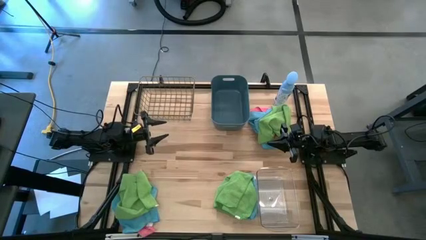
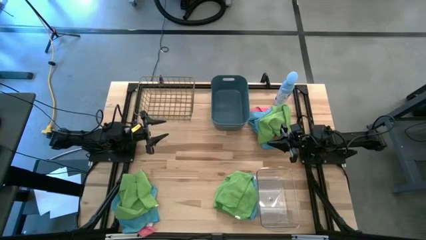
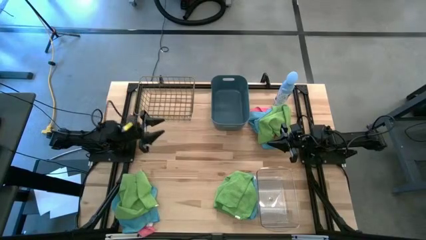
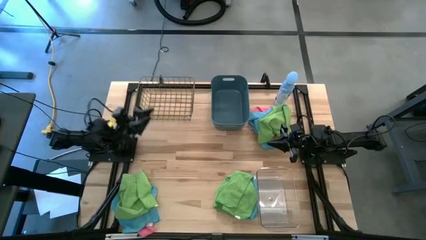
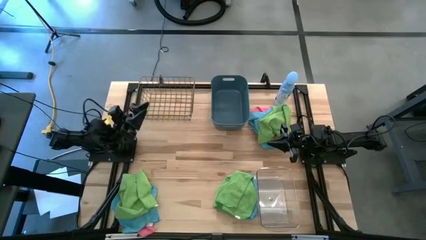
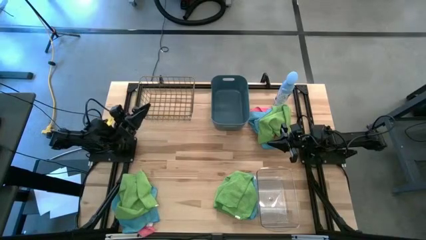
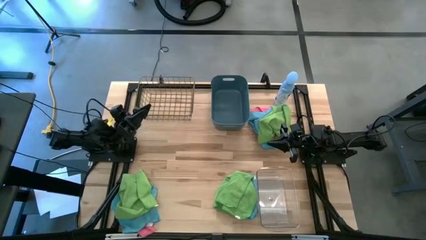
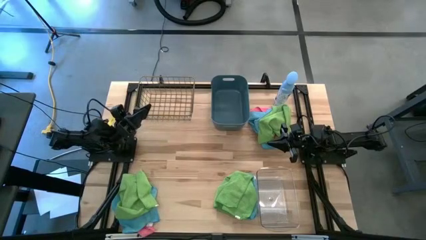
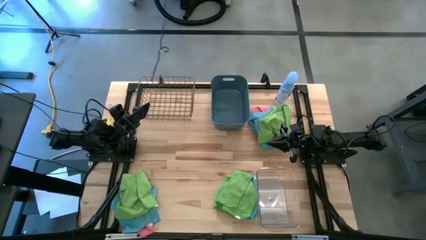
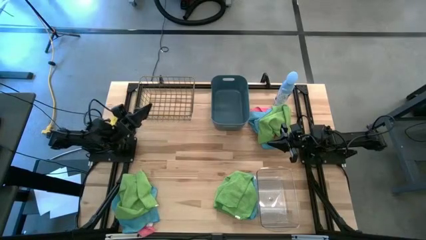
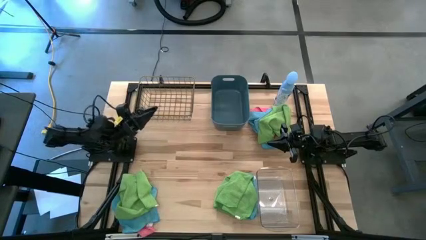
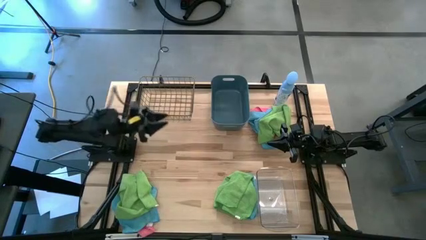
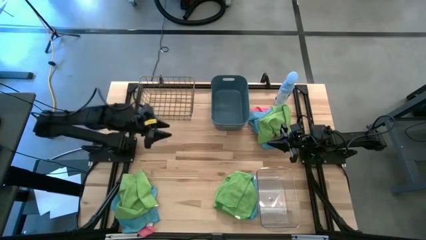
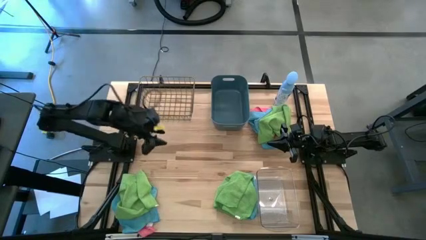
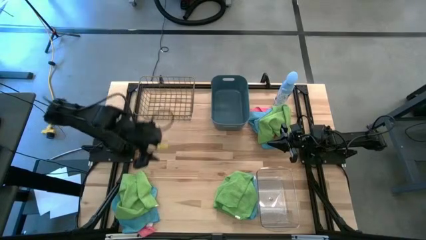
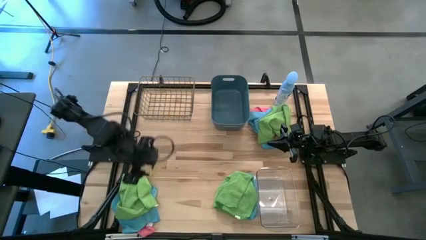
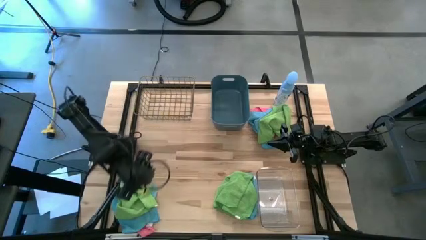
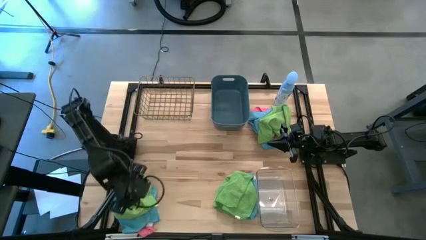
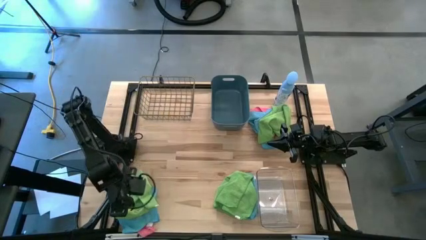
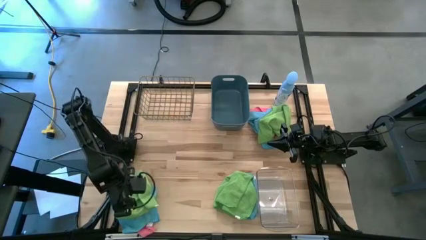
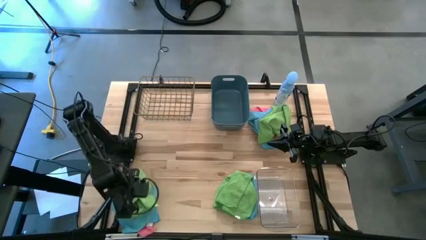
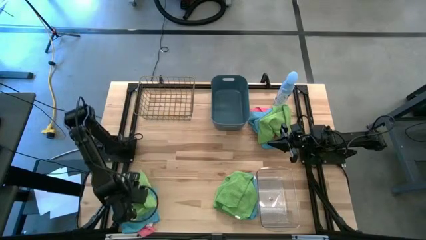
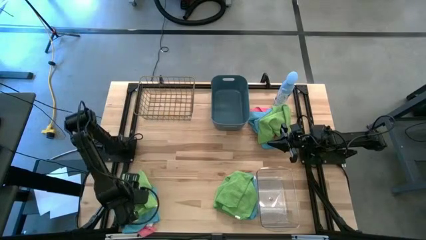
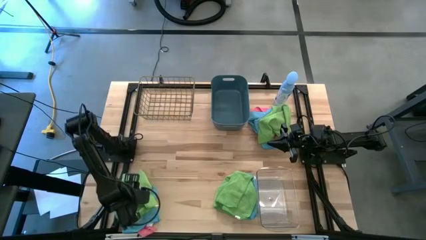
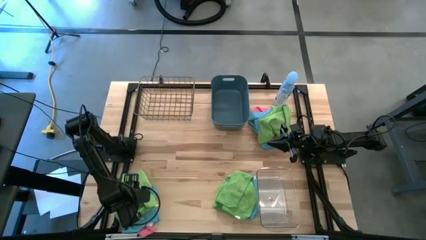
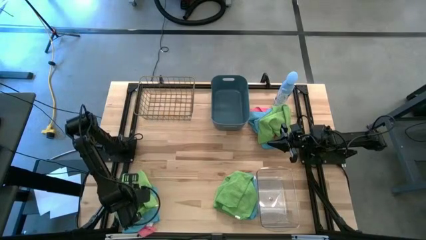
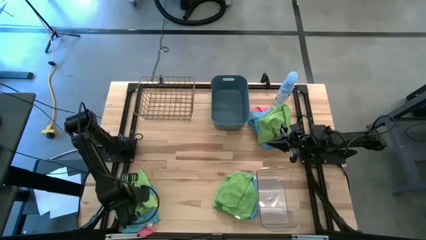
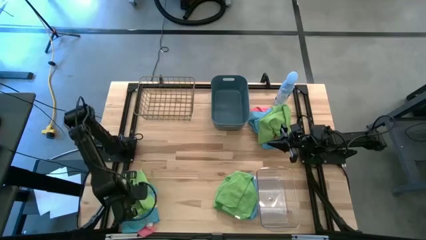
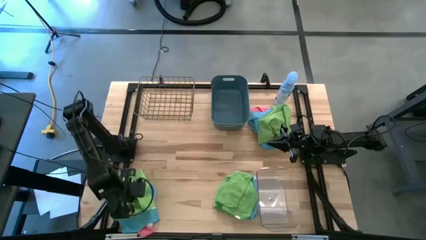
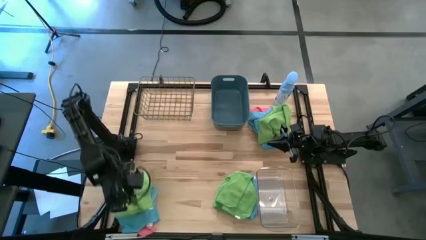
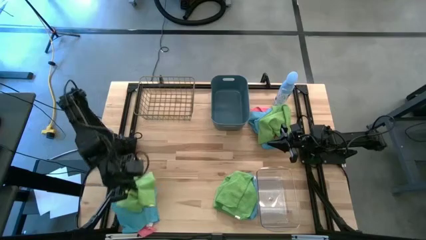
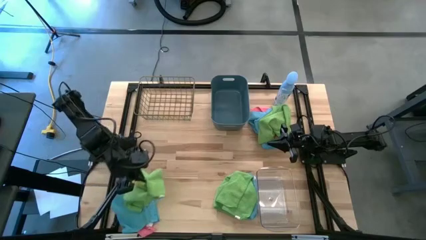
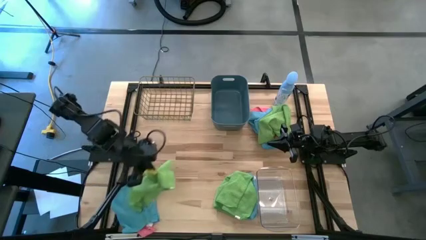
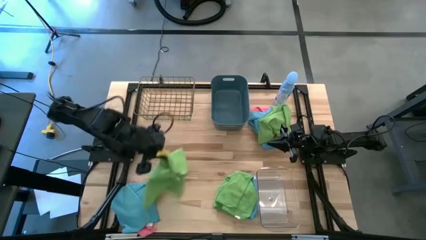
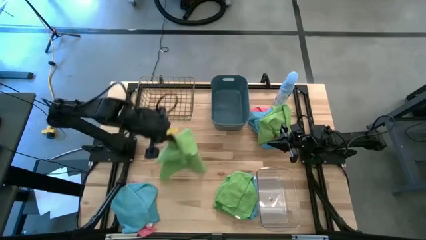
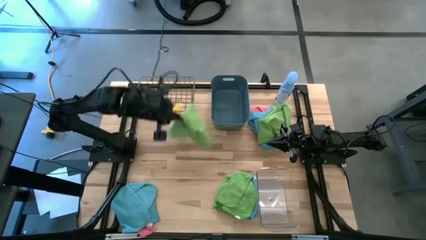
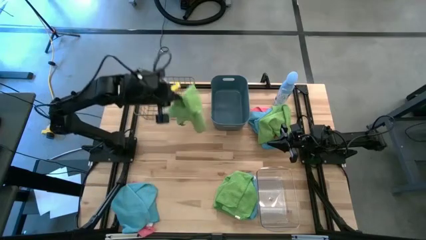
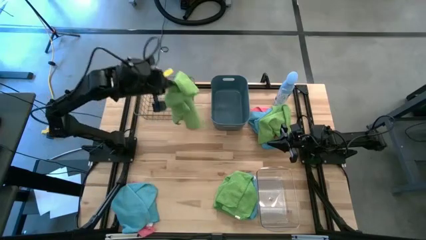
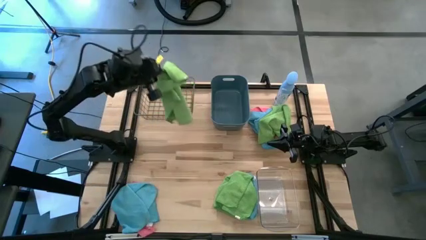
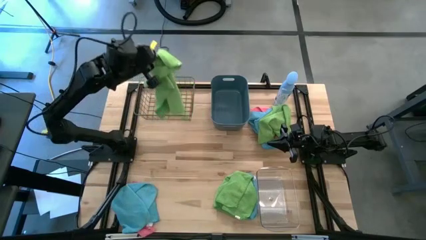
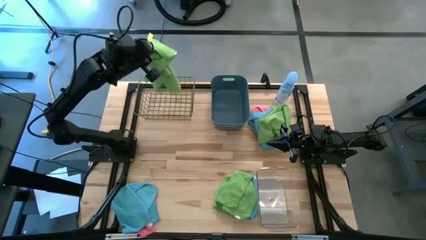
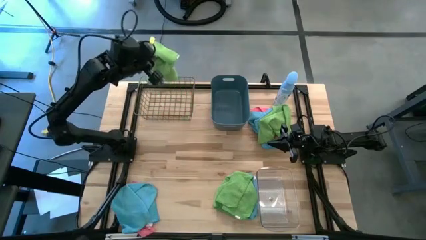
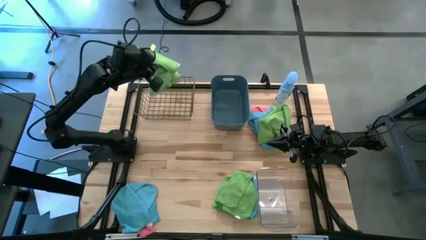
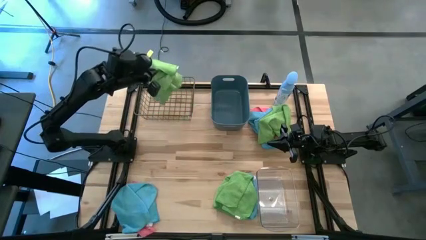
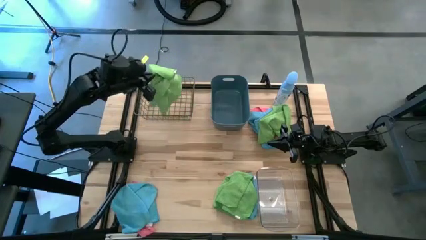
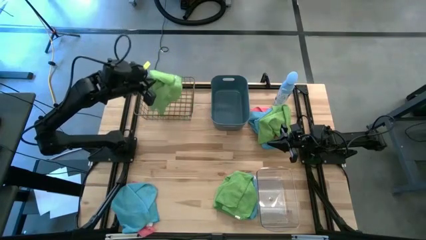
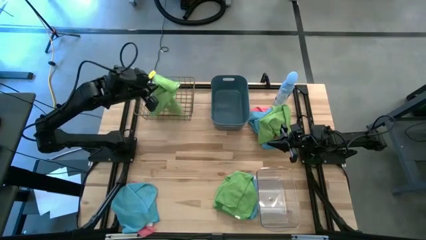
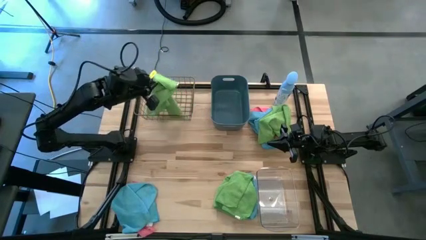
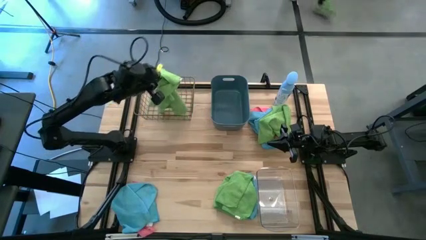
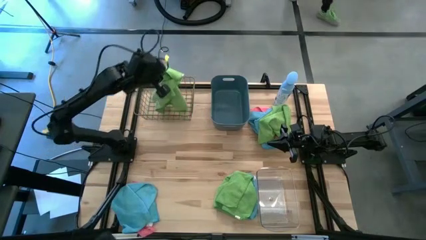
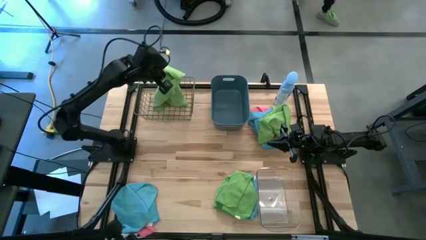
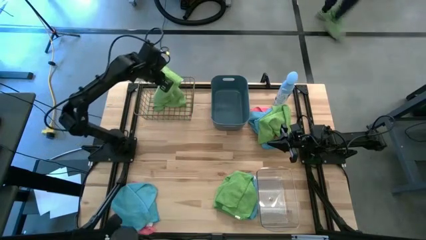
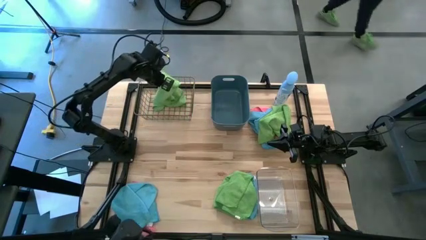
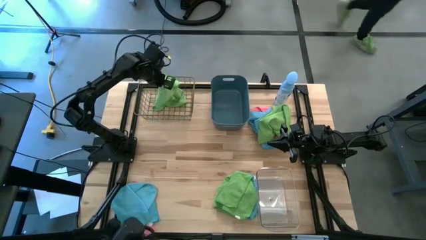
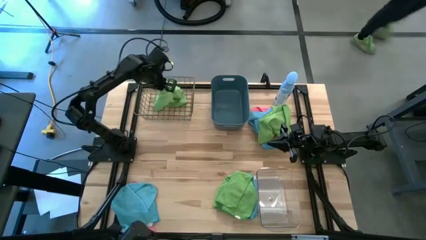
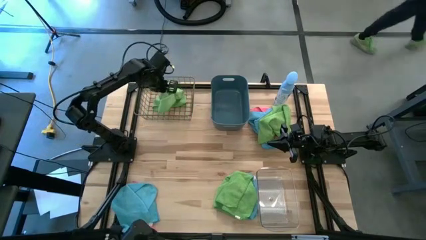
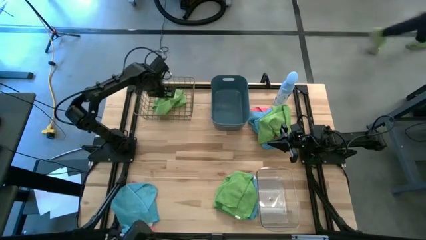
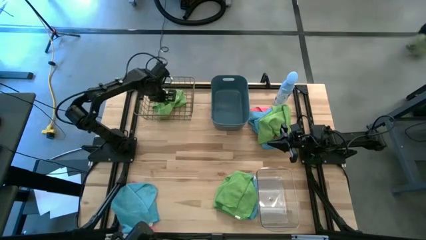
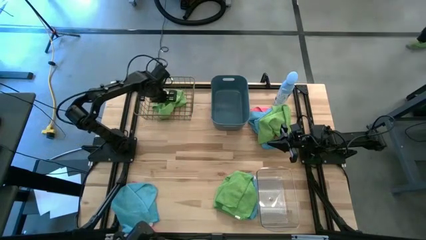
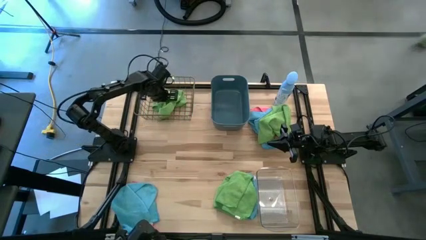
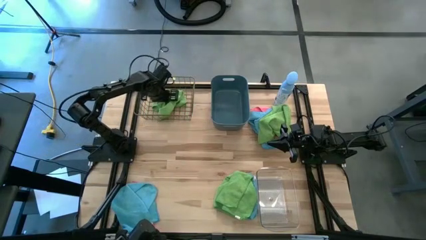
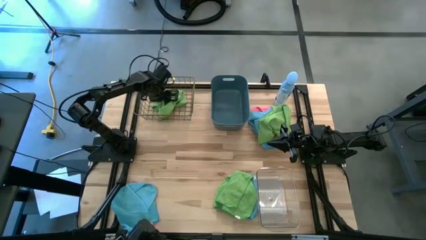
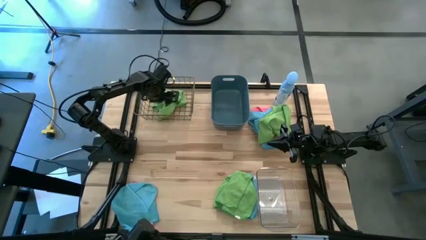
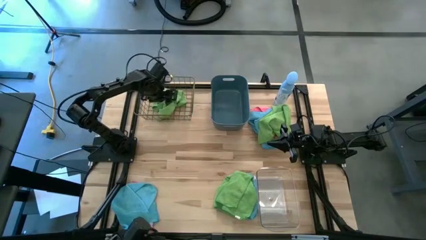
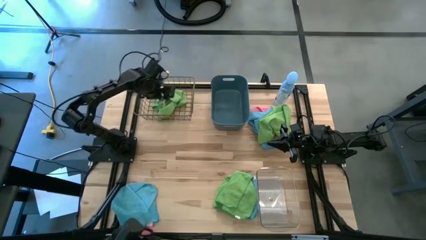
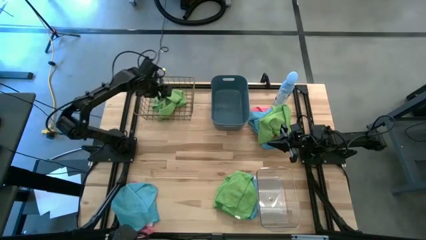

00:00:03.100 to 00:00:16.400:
Task: Sort microfiber towel by color & place in baskets
Put the bottom left green towel into the wire basket

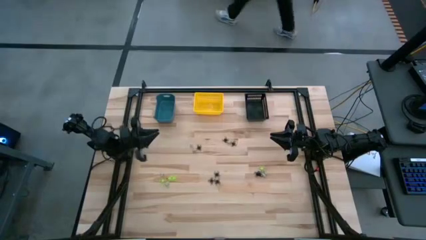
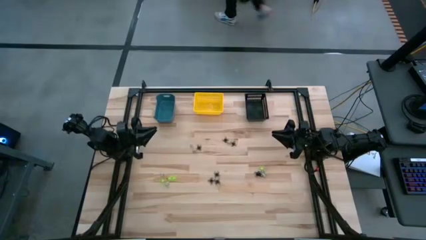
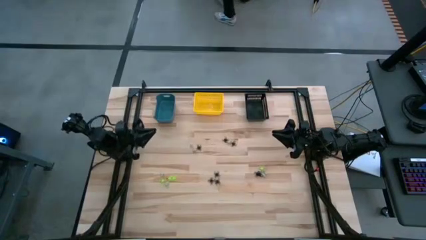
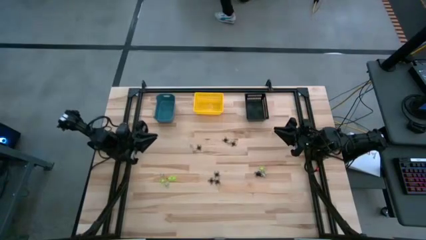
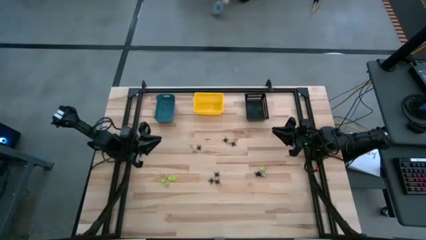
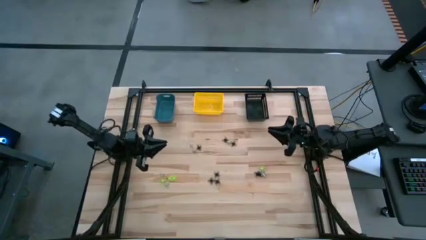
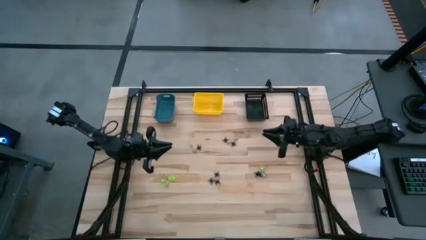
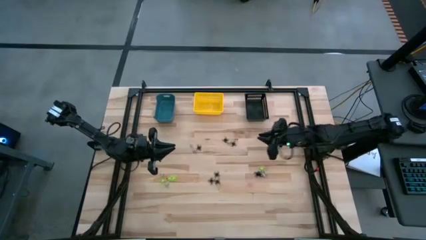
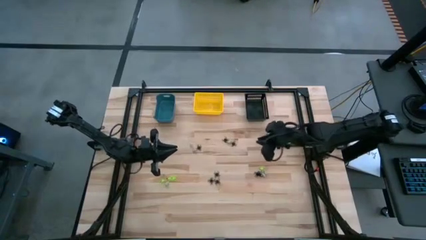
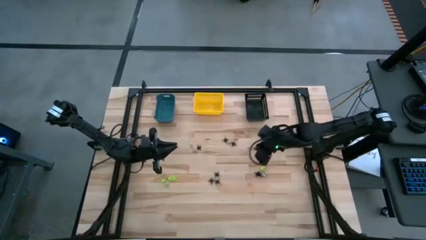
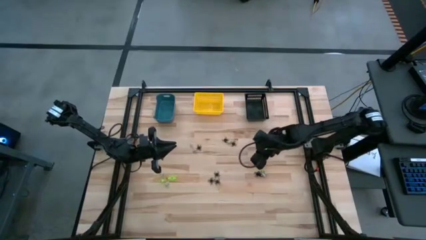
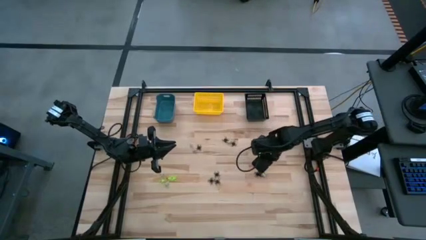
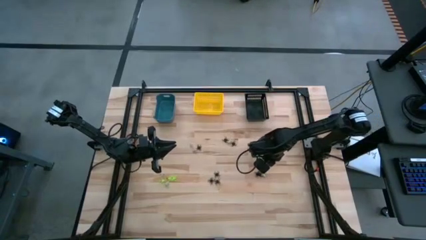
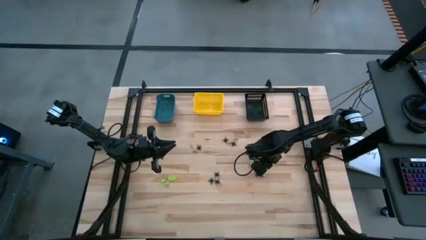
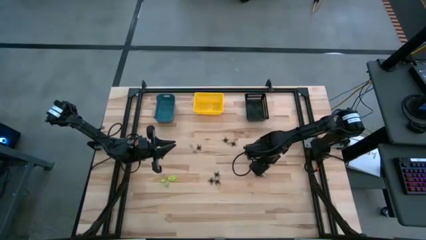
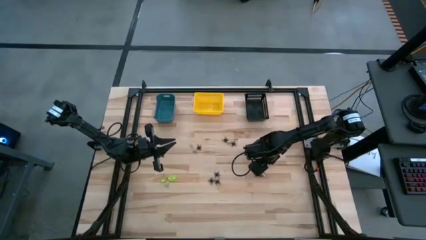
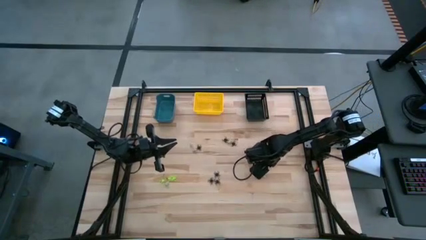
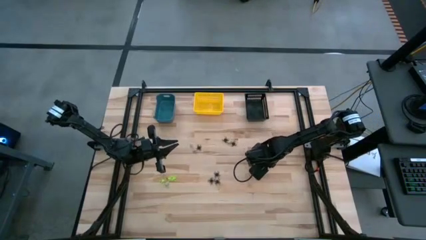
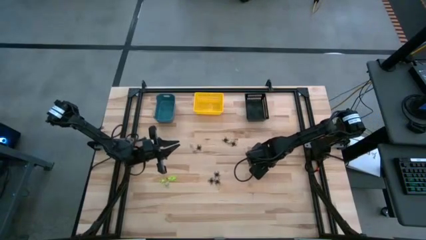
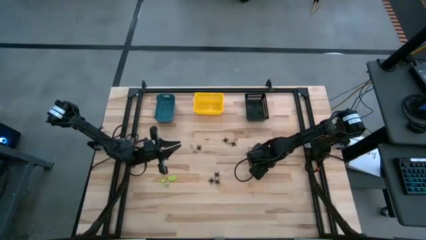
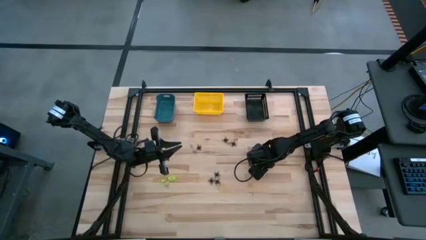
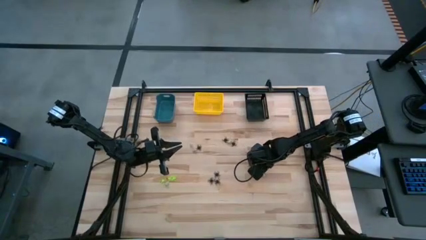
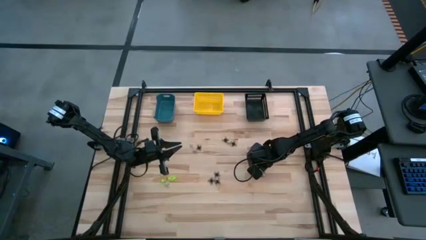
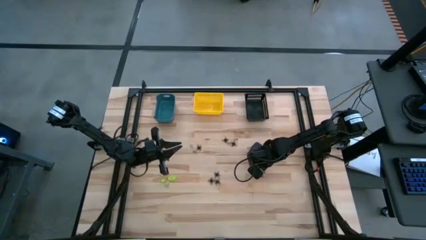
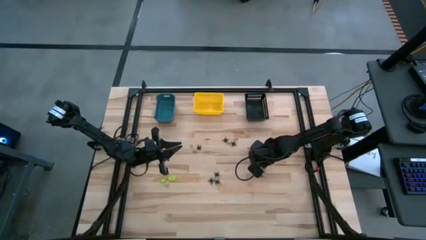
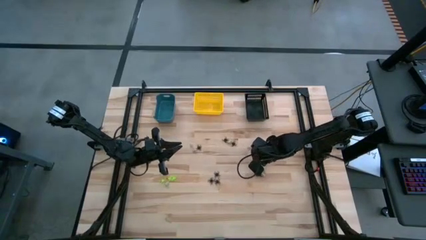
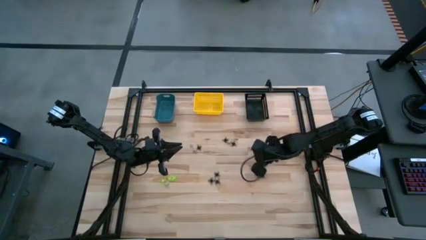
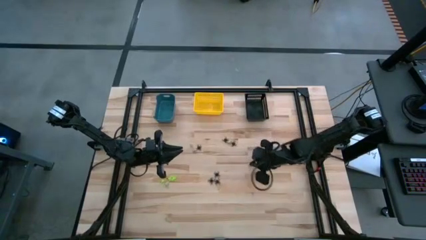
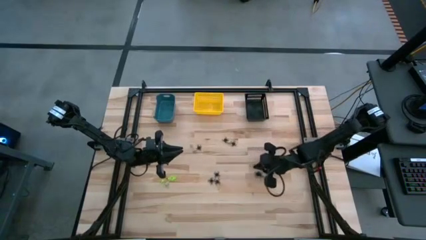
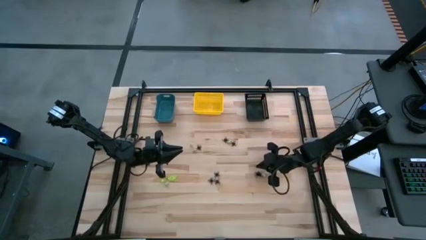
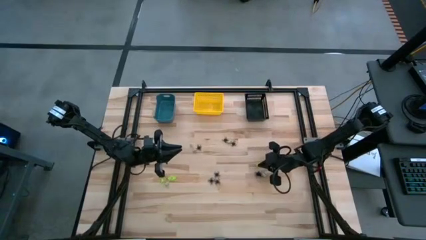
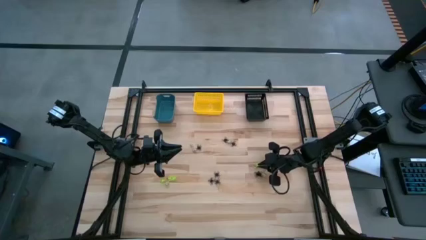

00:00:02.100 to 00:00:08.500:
Task: Sort Halloween decoration
Put the green spider toy into the yellow bin
